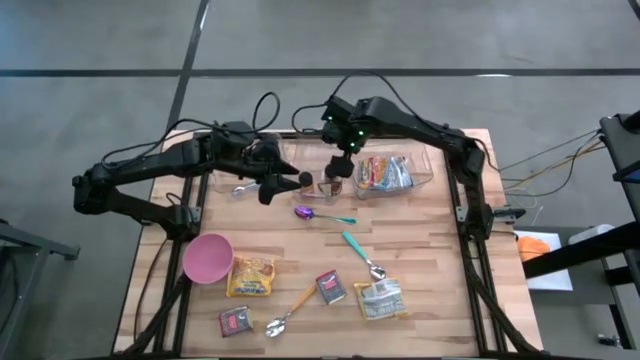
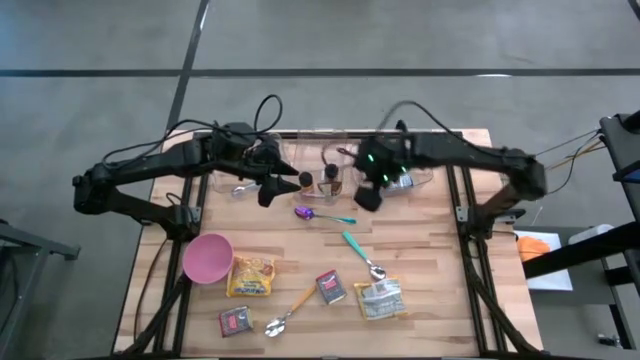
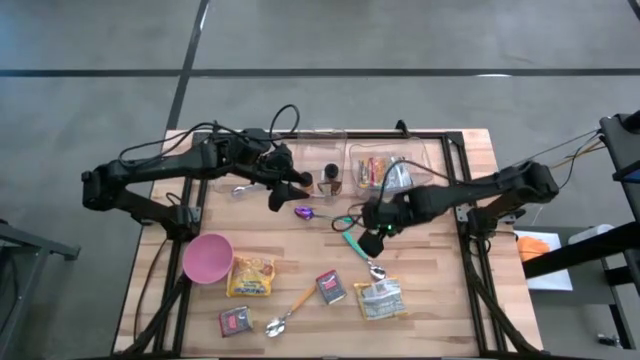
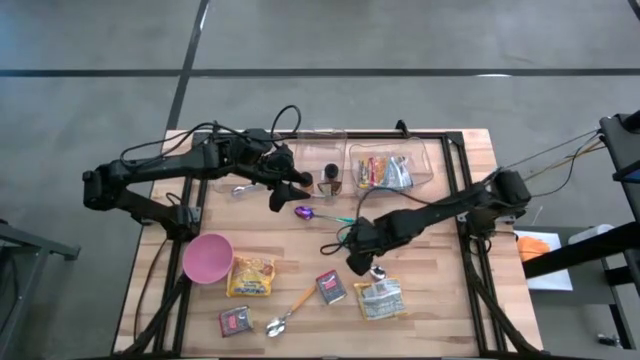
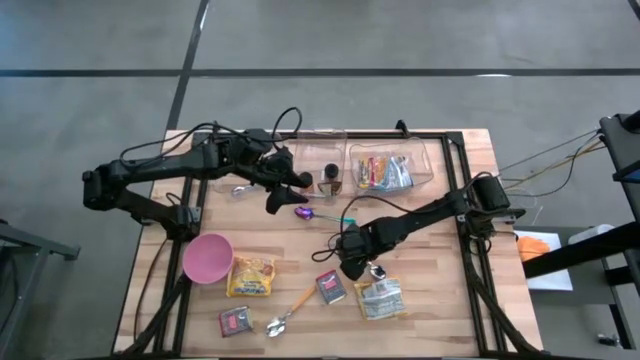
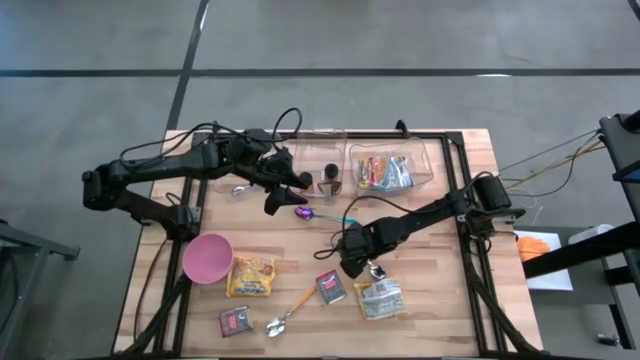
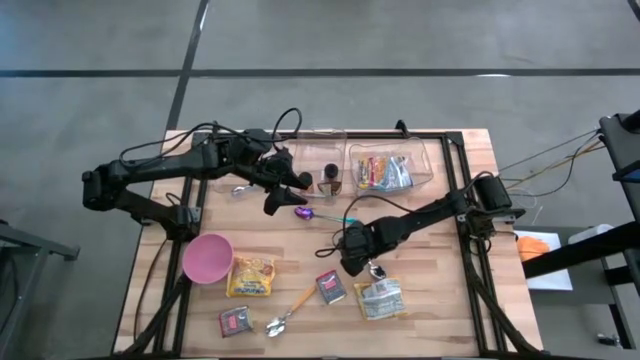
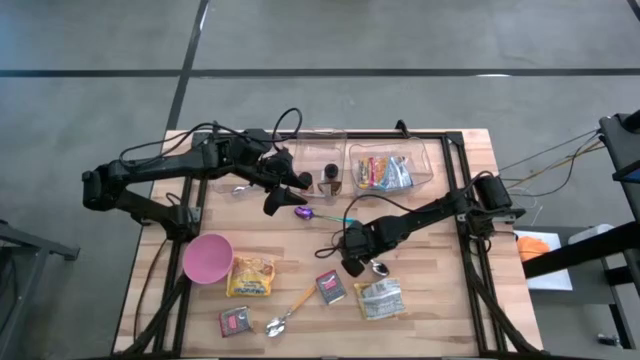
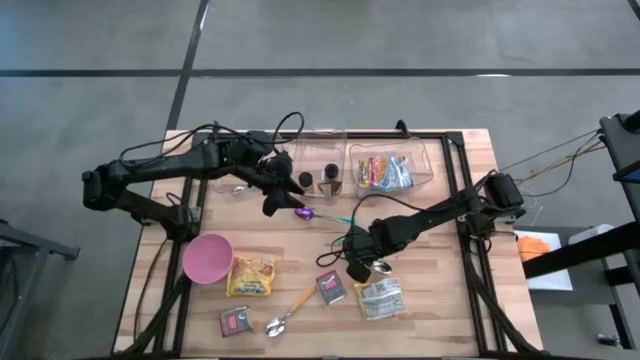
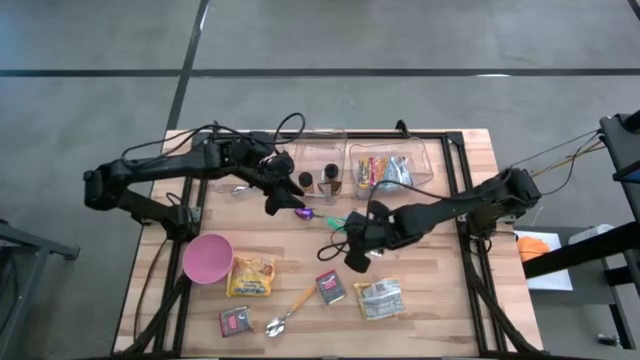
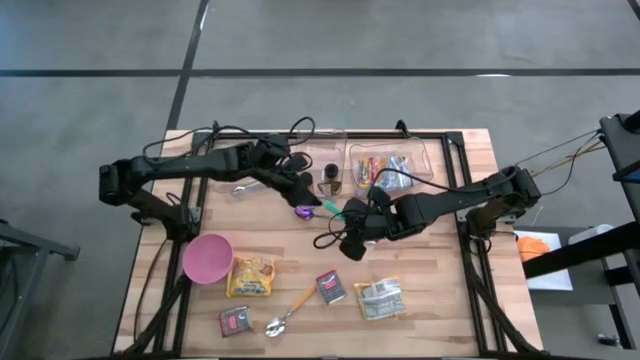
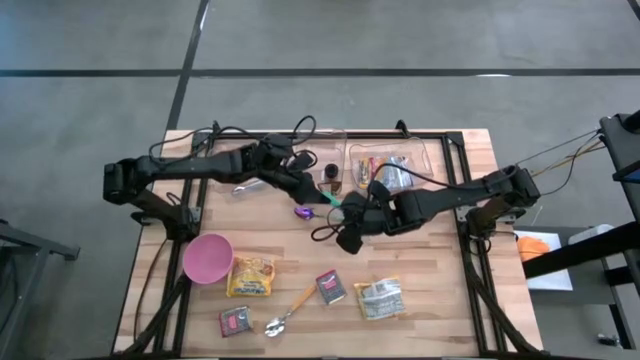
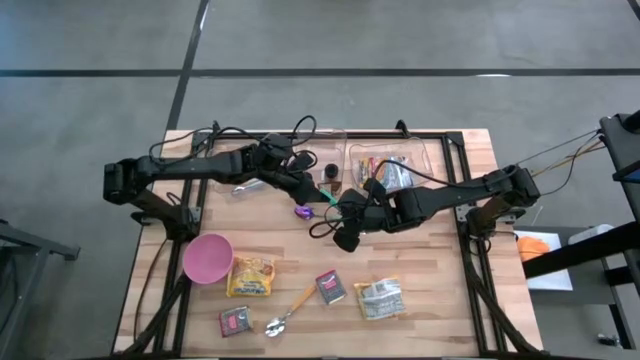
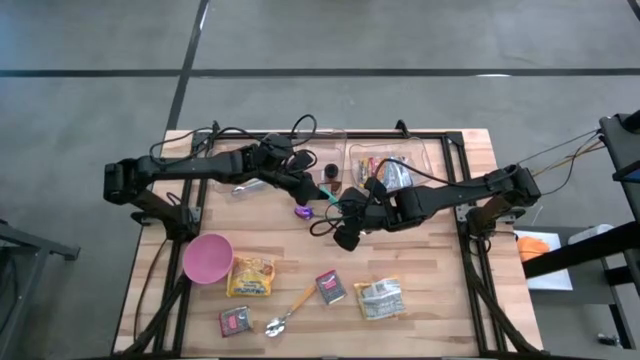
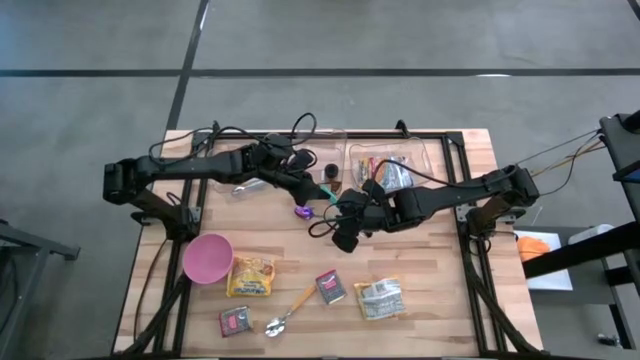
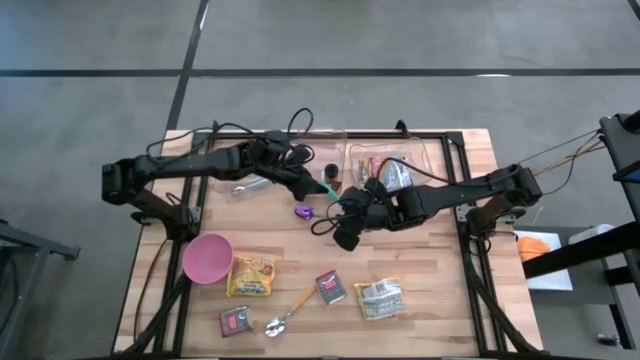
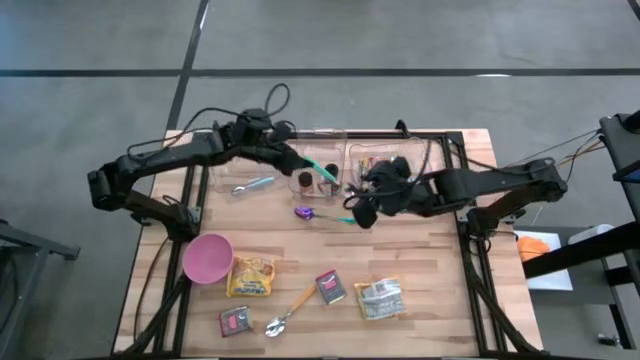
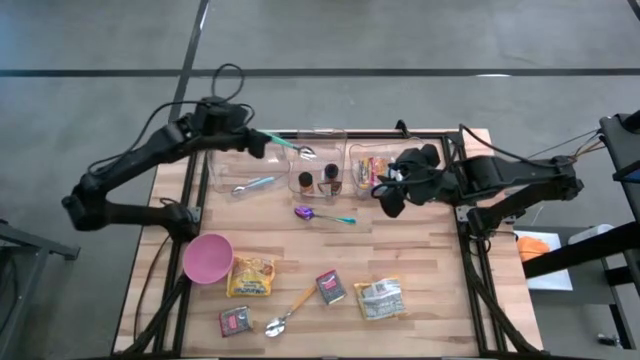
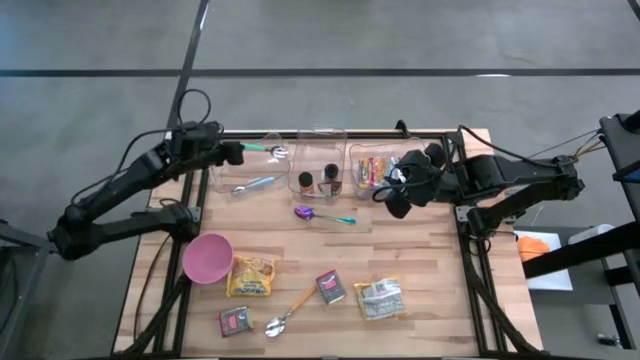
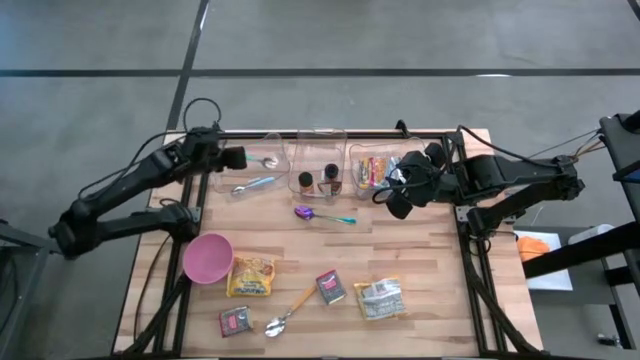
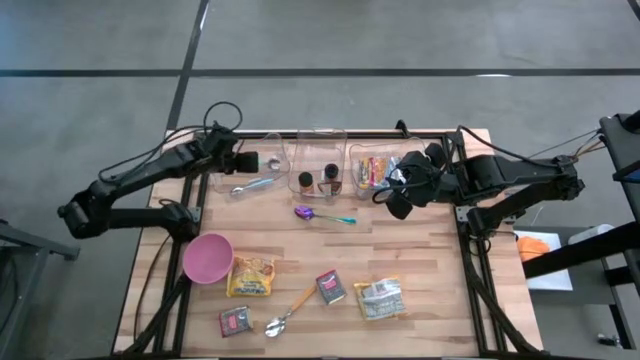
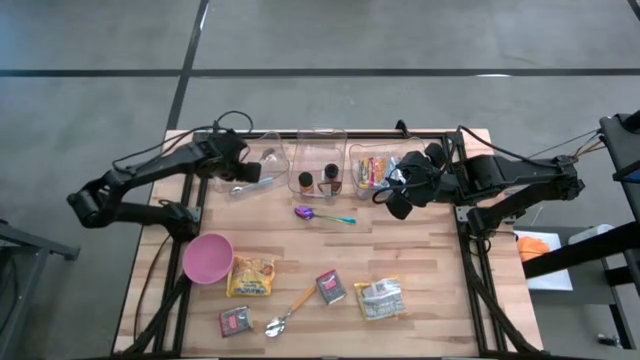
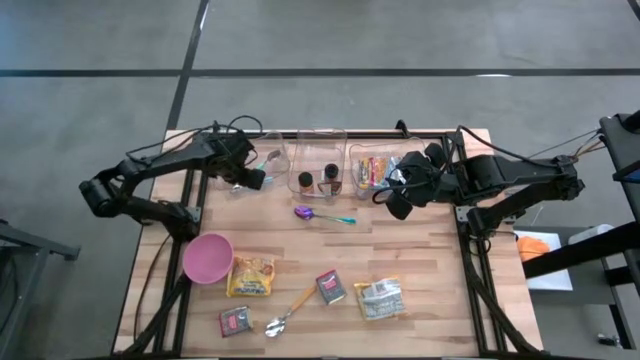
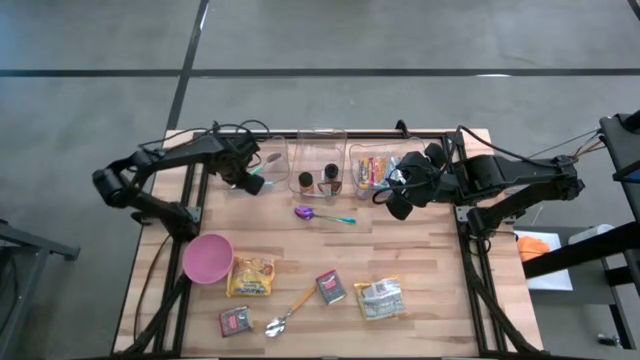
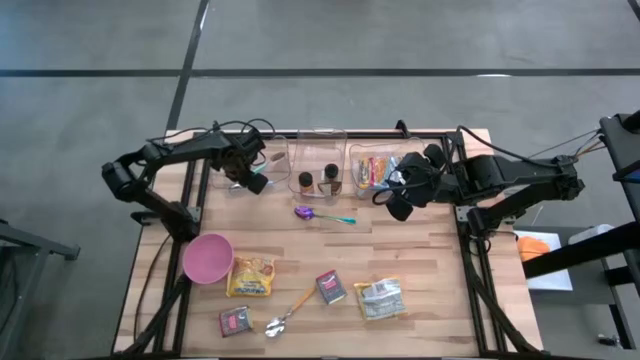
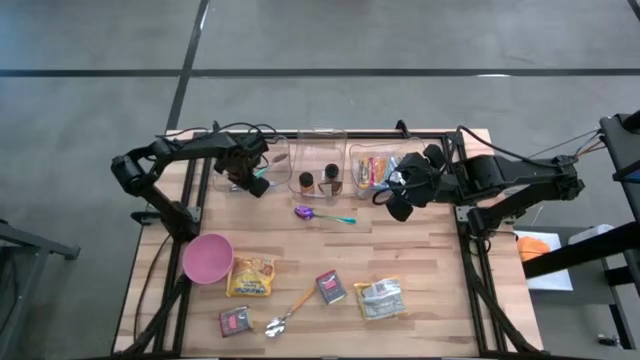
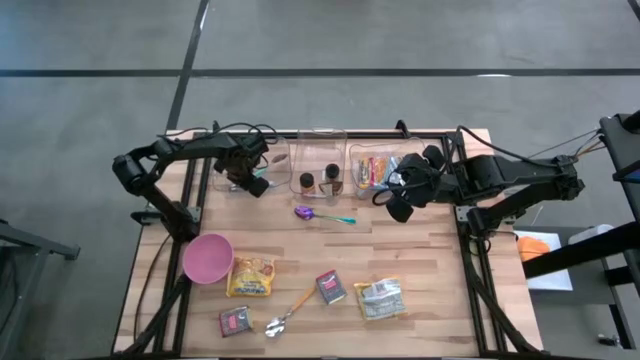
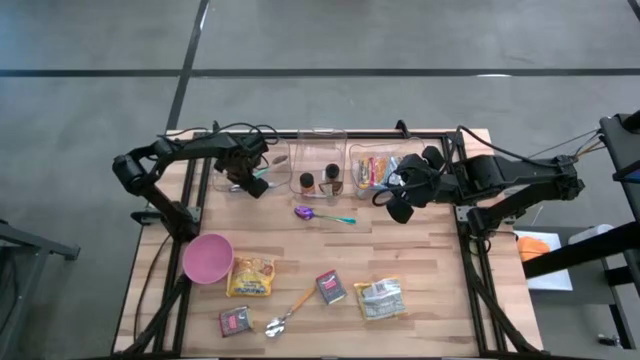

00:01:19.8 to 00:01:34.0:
Put the light blue spoon into the left transparent bin

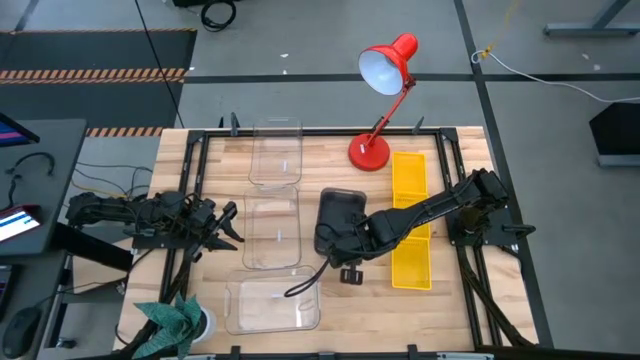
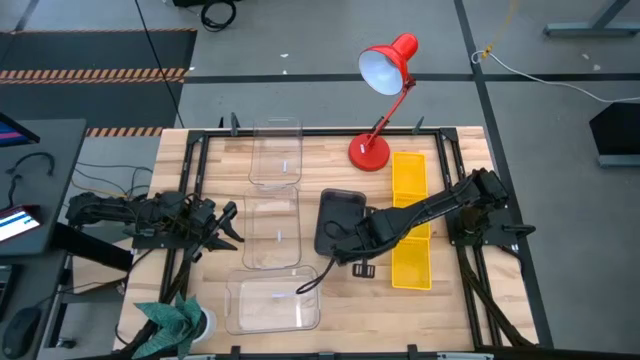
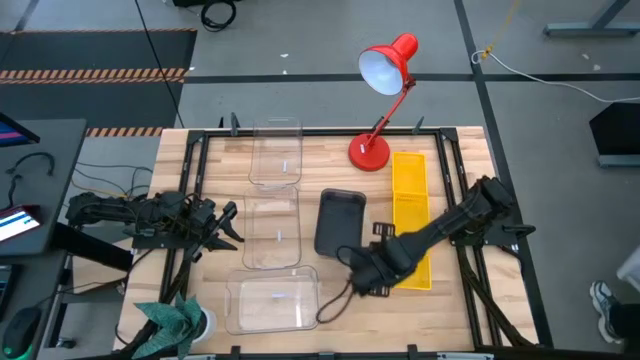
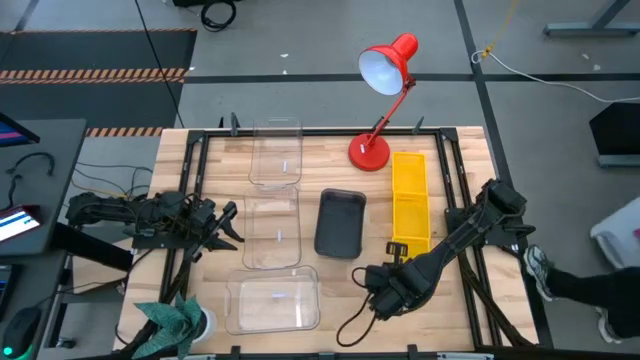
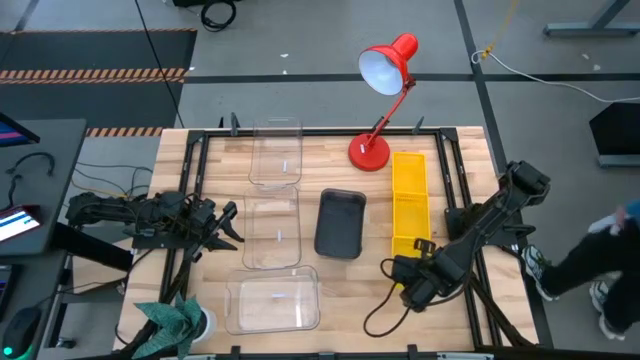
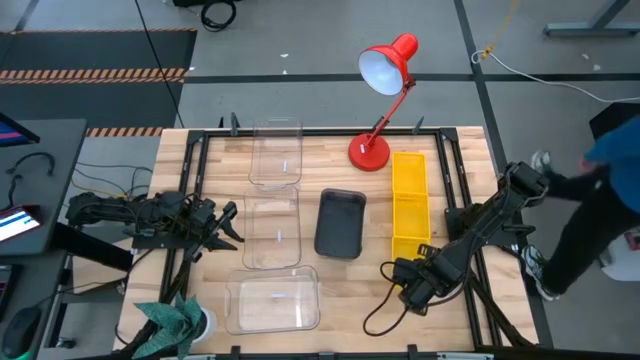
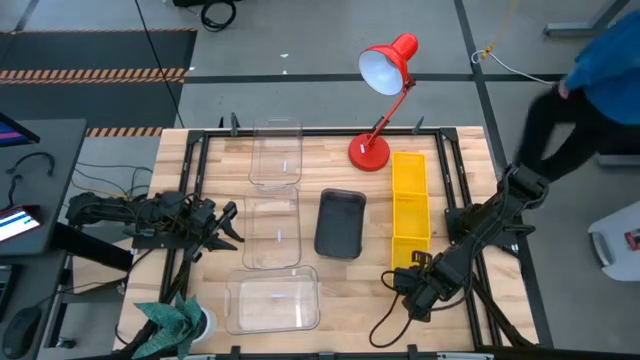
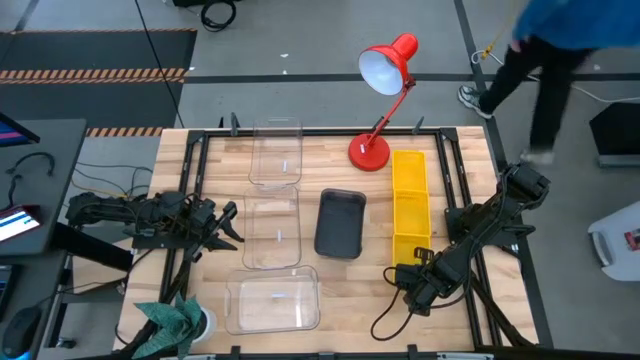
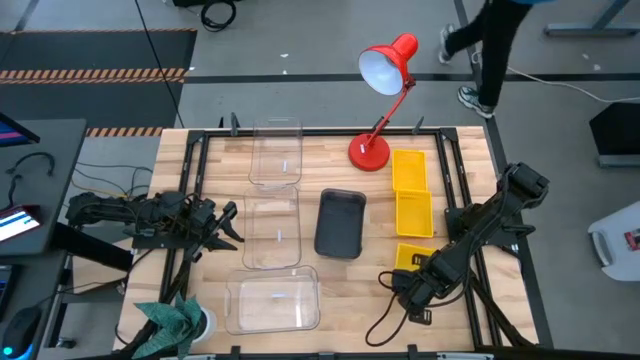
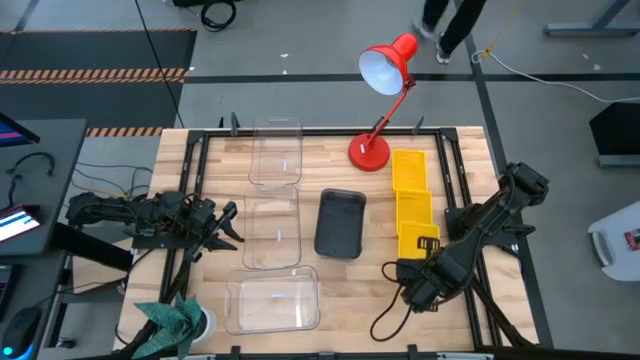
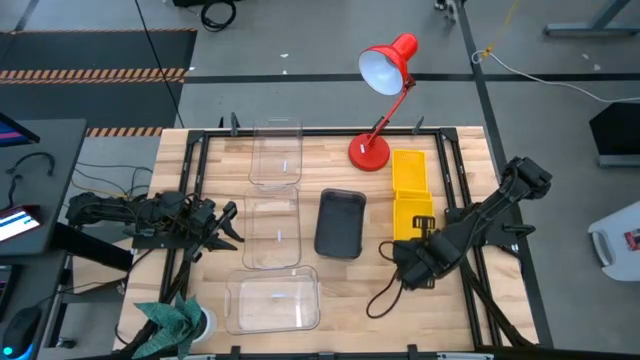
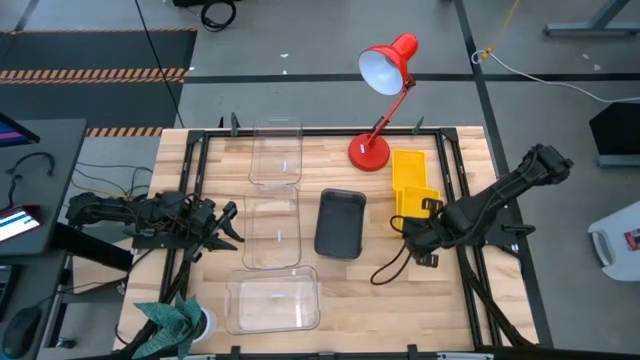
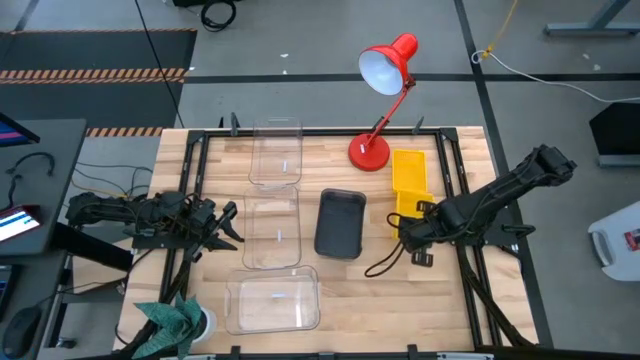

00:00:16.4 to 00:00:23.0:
Stack the bottom yellow bin on the middle yellow bin
